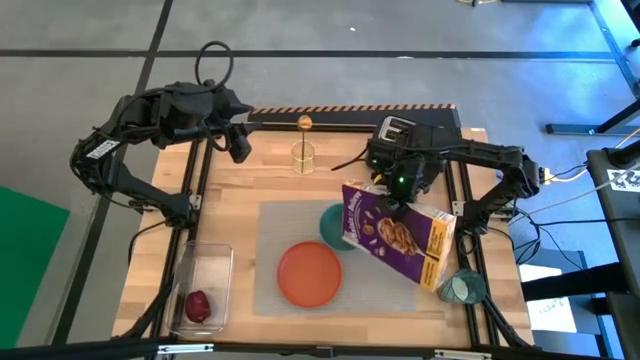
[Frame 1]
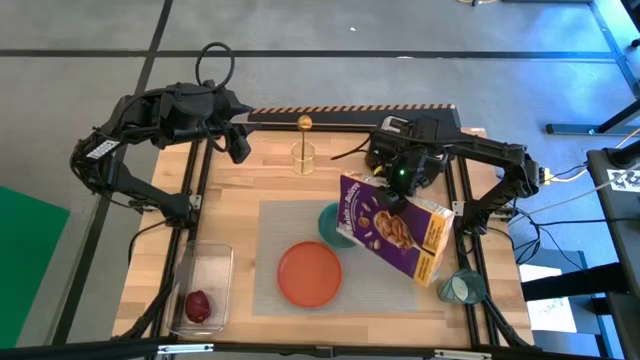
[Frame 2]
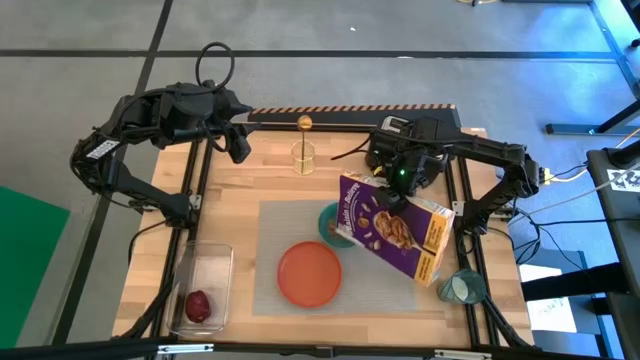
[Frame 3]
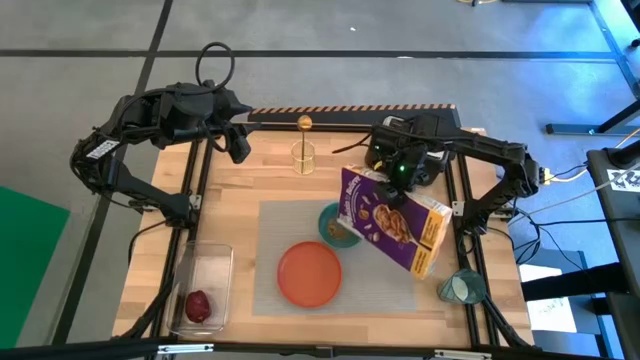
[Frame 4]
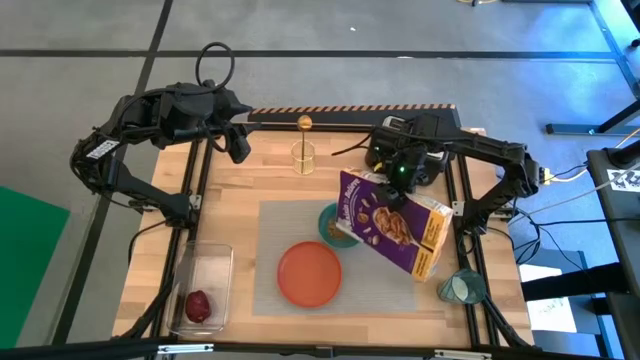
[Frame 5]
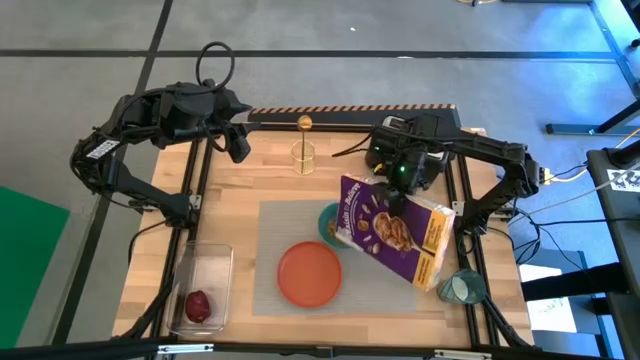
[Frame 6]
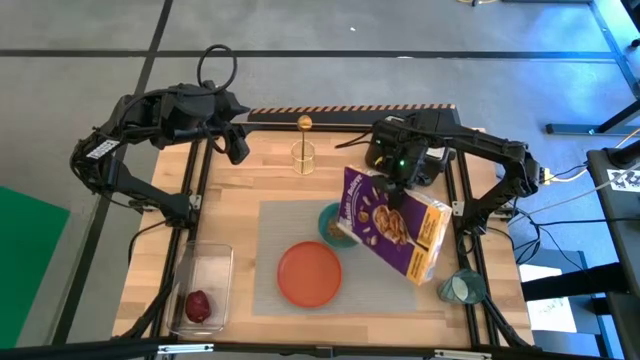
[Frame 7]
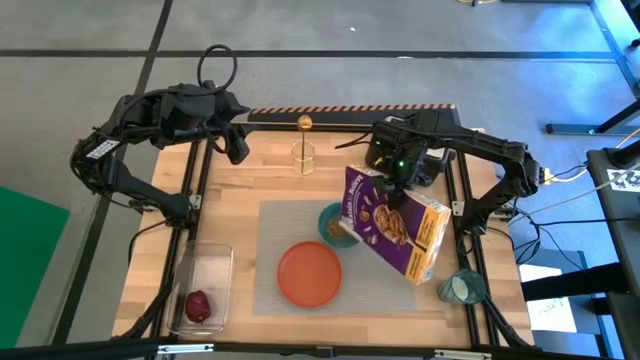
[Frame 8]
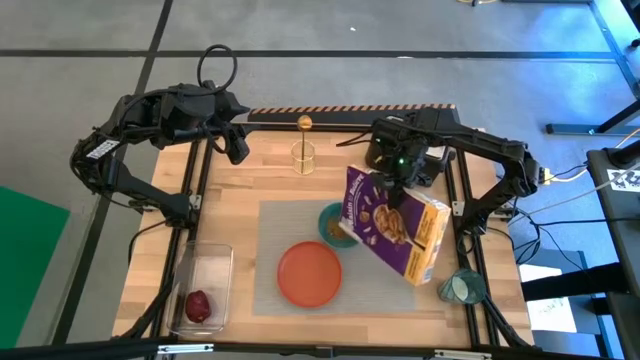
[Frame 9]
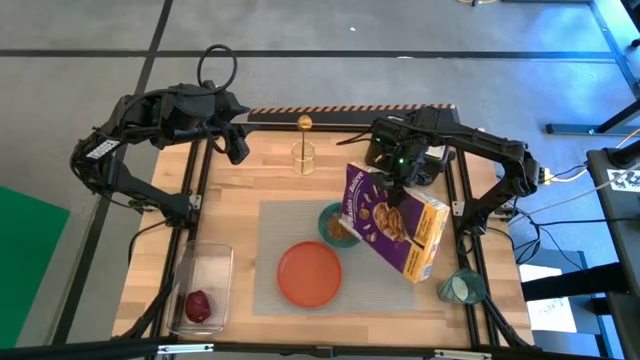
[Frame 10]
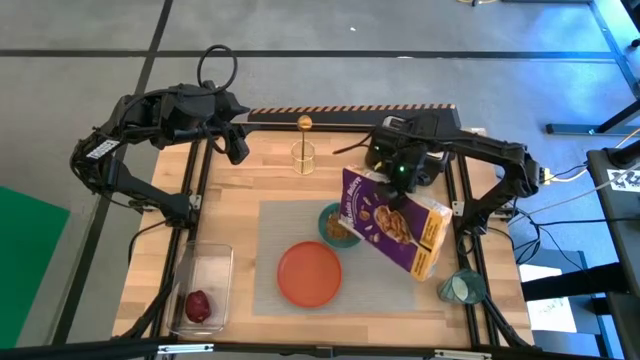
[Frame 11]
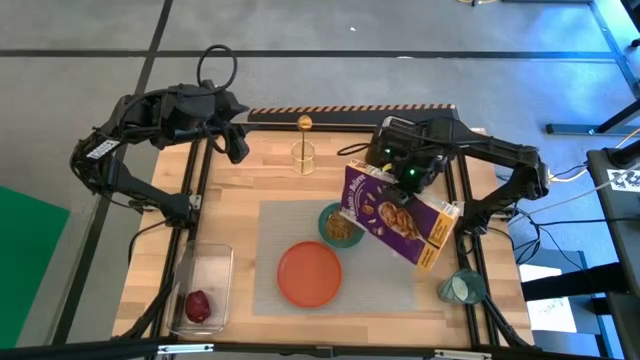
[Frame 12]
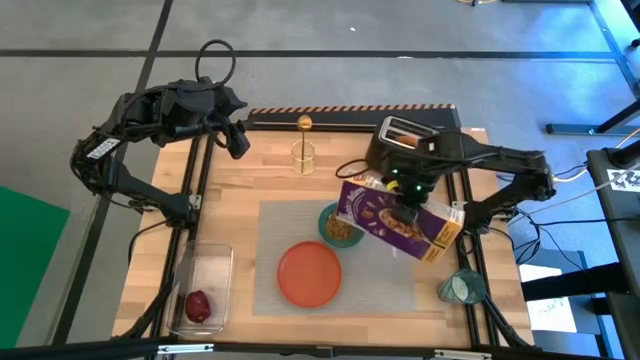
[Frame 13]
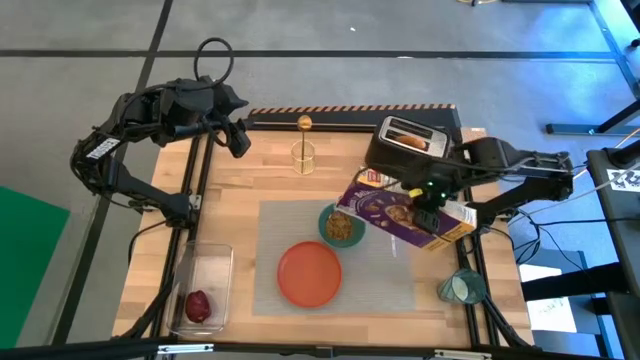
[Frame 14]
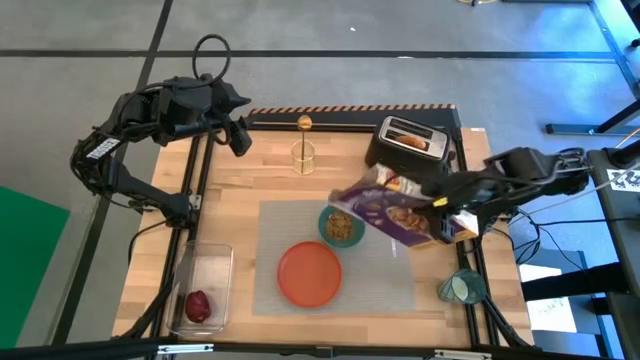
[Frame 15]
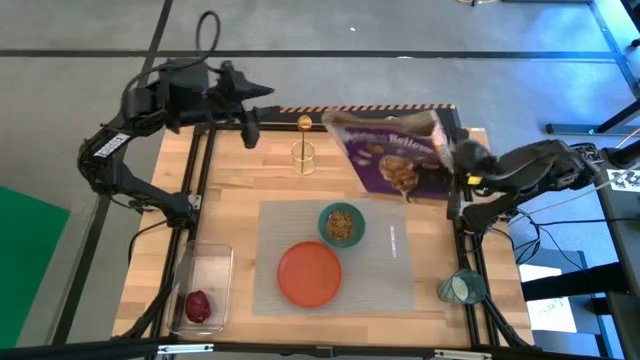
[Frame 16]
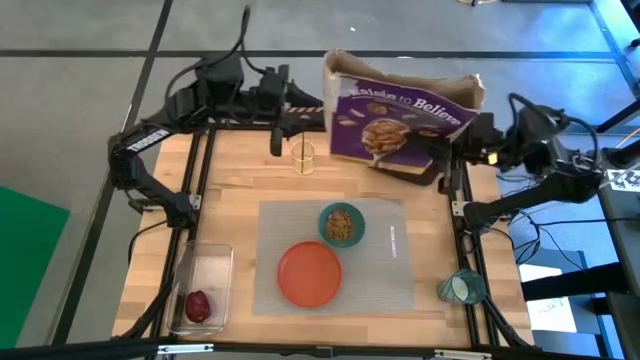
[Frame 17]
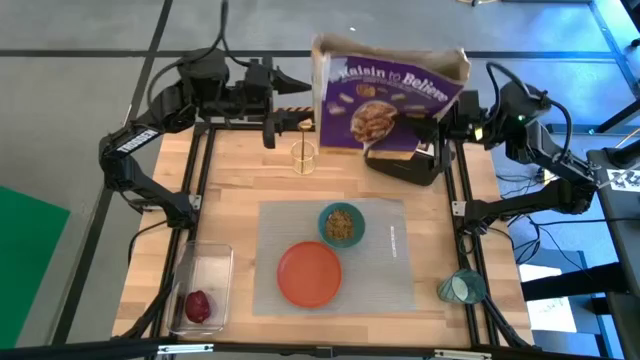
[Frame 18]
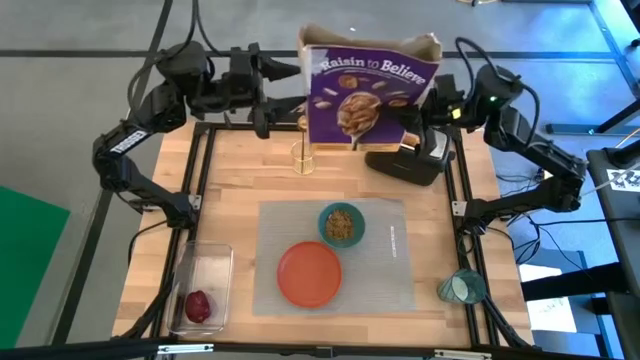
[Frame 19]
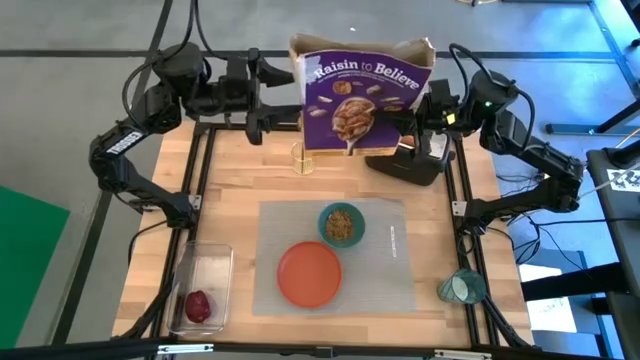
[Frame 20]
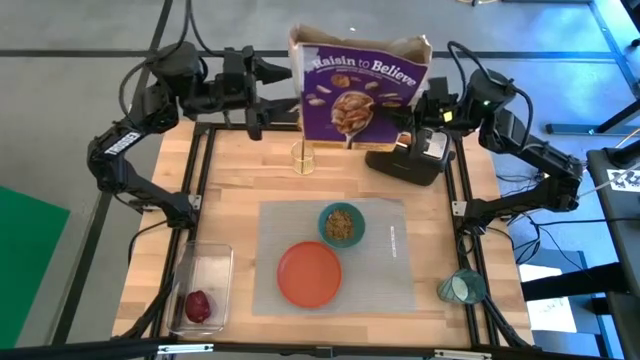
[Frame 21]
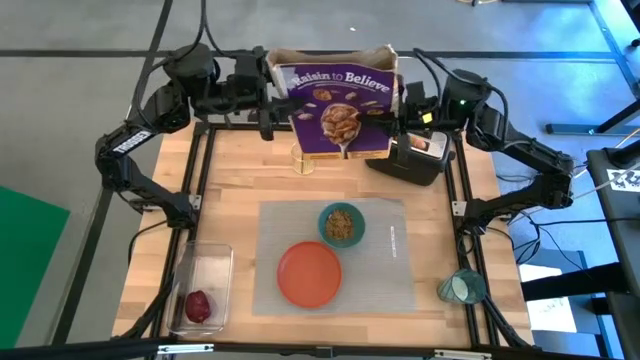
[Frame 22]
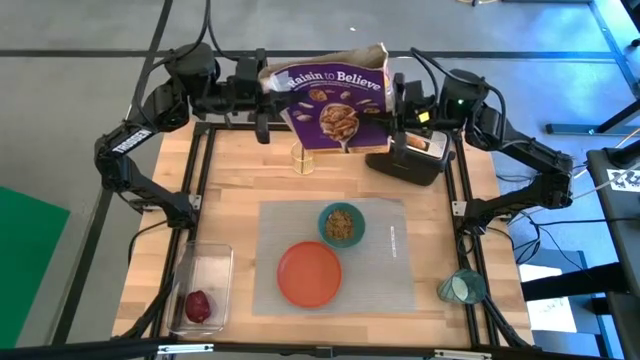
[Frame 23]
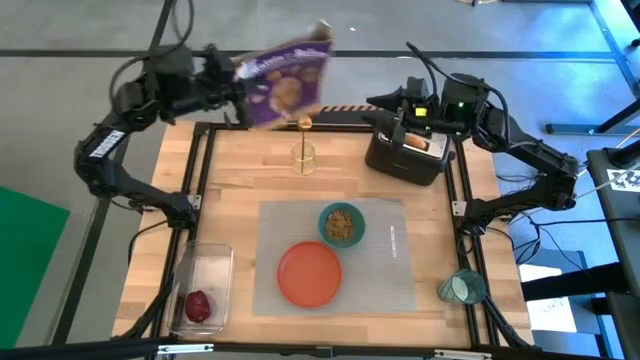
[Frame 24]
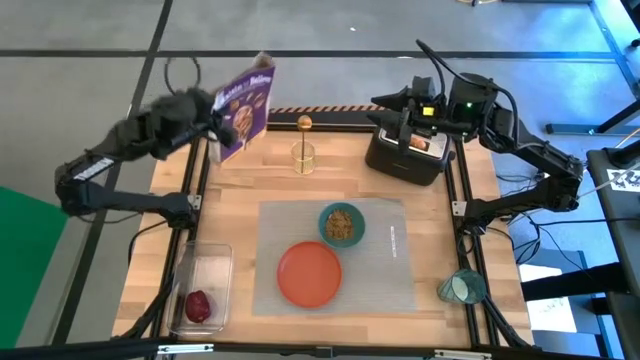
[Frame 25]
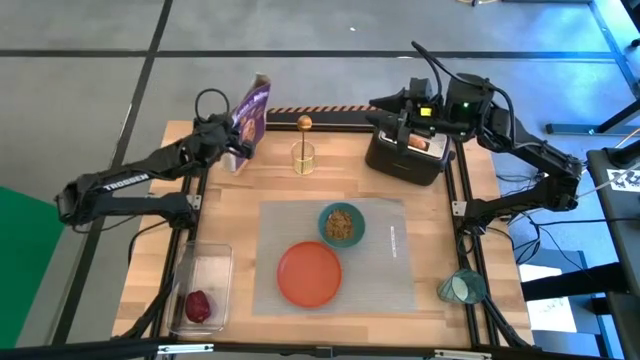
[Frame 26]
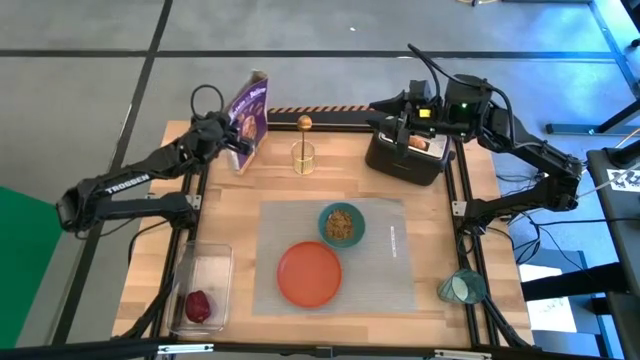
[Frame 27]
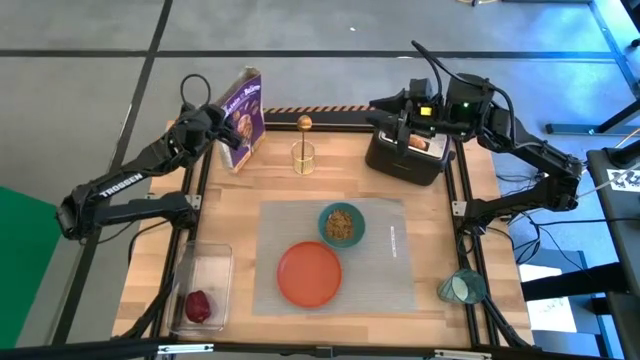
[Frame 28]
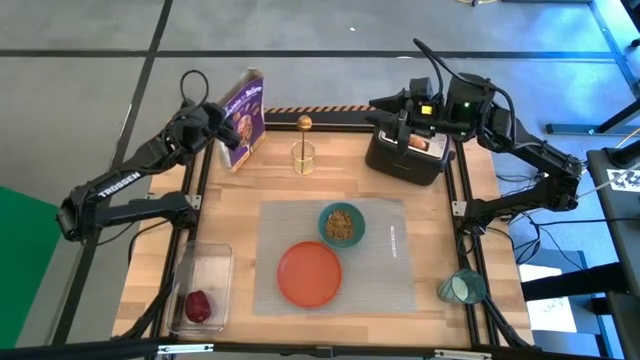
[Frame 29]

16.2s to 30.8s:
Task: Arrange a breakfast setting
Pour the cereal into the green bowl

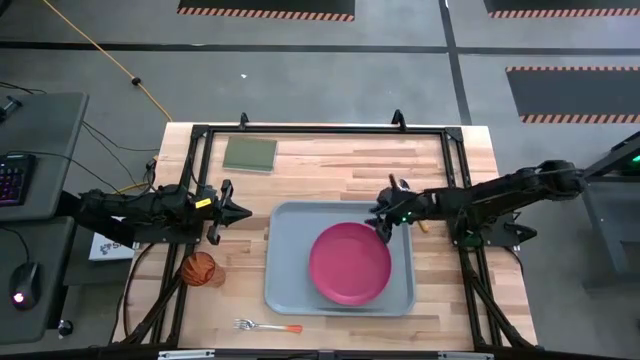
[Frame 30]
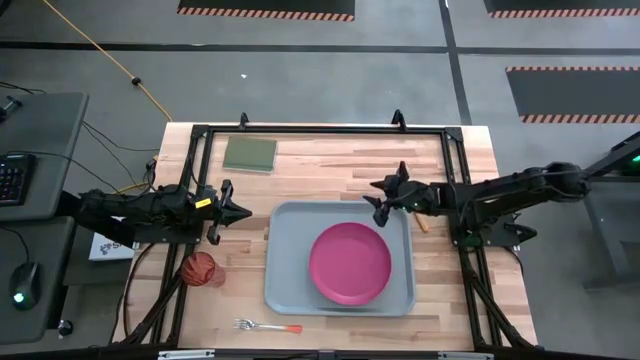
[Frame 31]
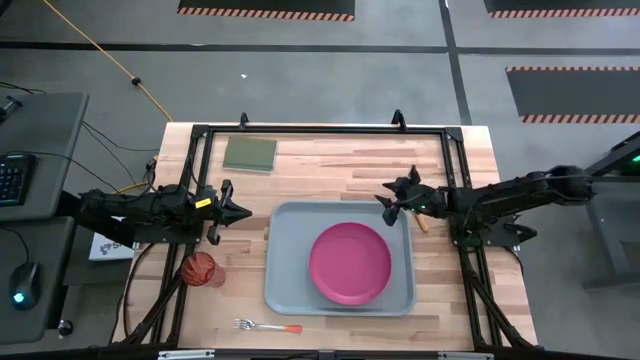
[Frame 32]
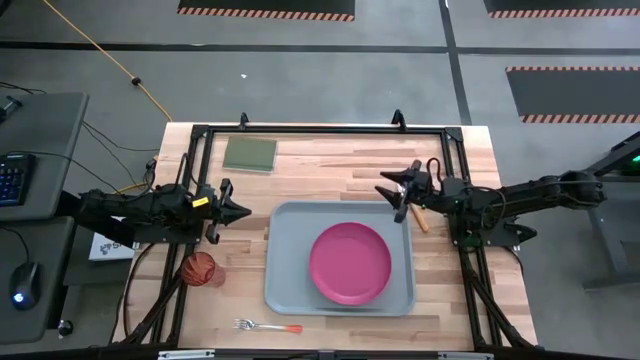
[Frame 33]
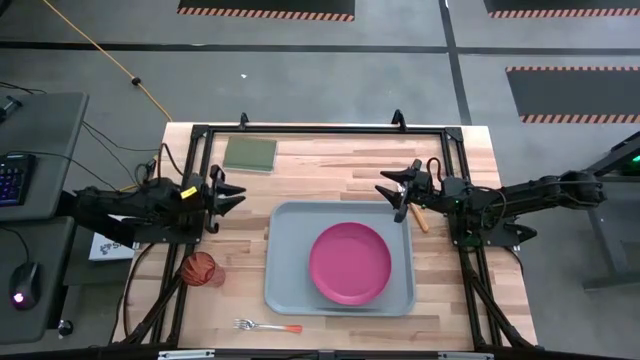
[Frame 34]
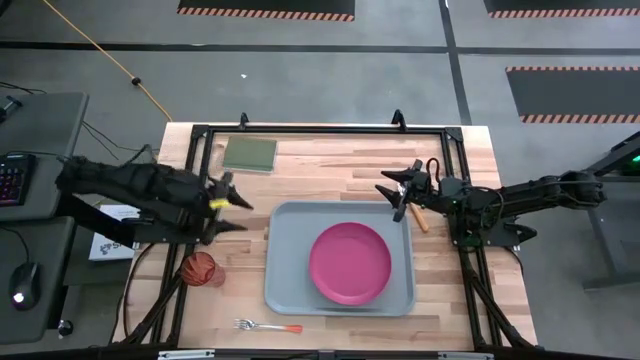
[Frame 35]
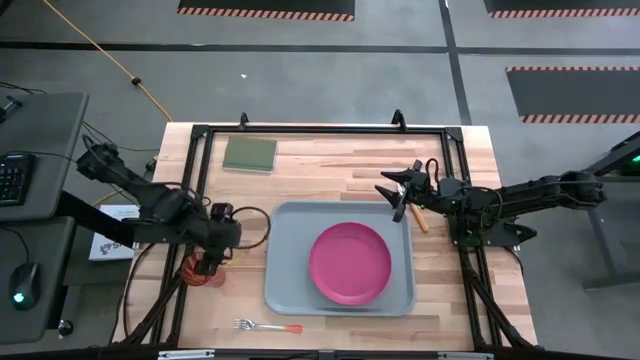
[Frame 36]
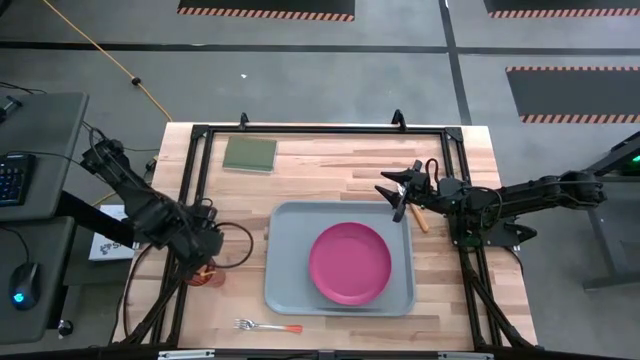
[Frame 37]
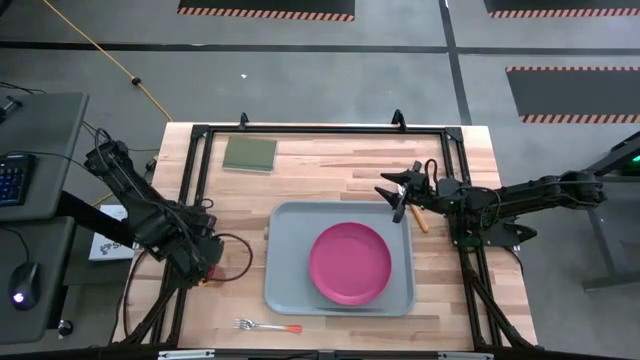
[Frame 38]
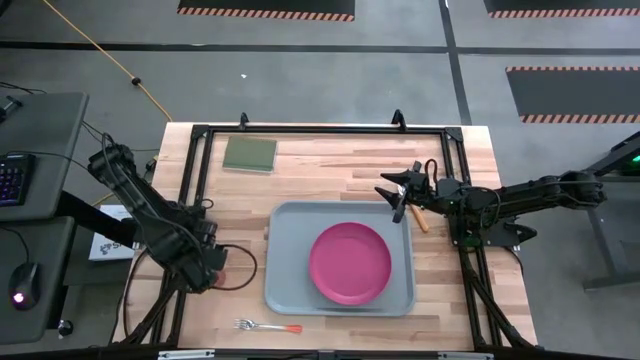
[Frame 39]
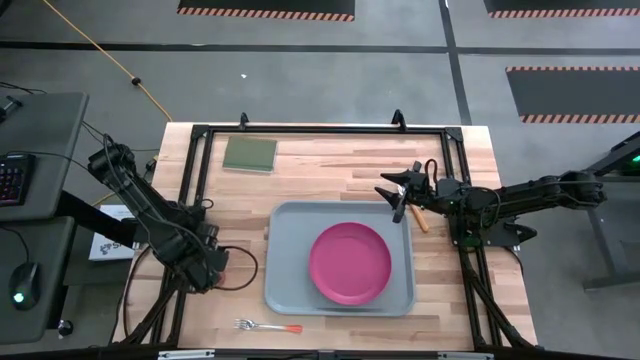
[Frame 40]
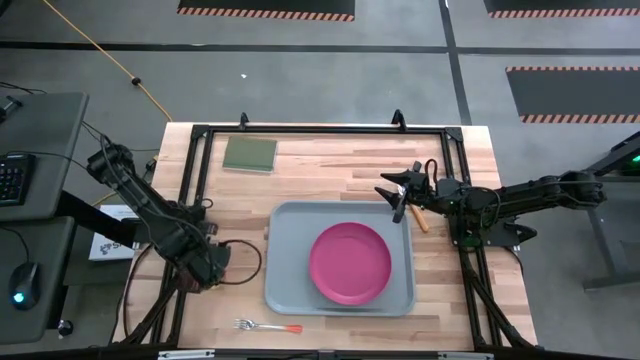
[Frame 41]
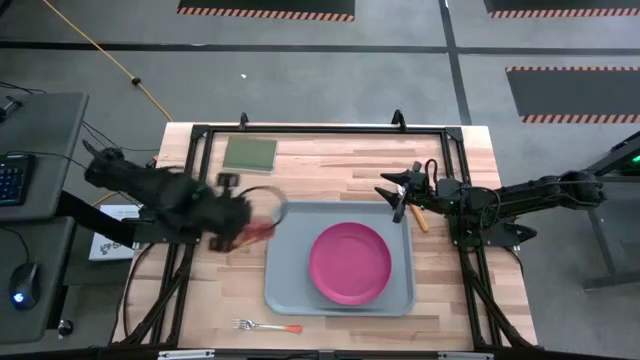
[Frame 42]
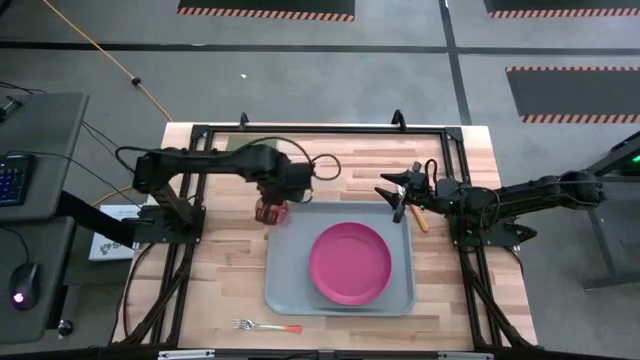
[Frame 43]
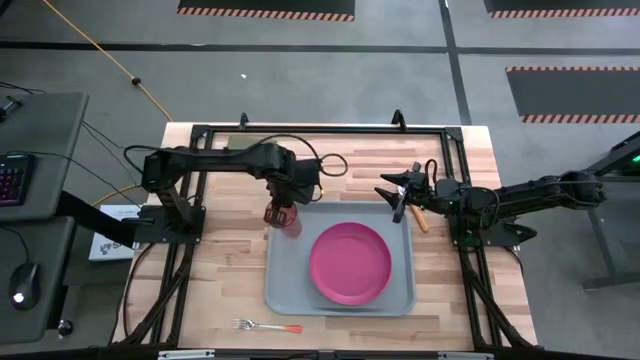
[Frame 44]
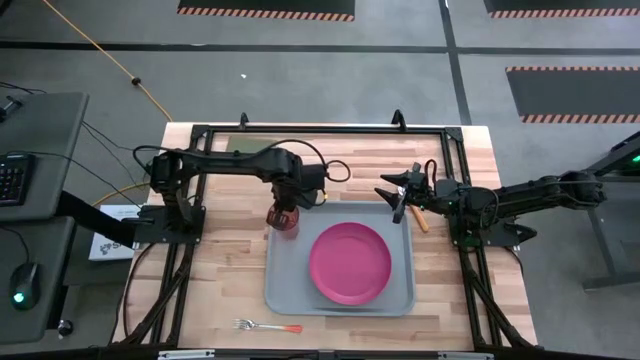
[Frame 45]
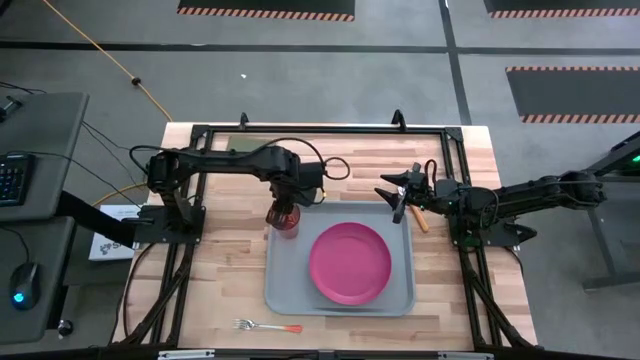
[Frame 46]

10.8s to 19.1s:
Task: Pick and place plate/cup/fork/spoon on tray
Put the red cup to the top left of the pink plate on the gray tray
